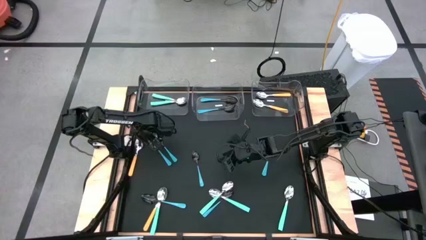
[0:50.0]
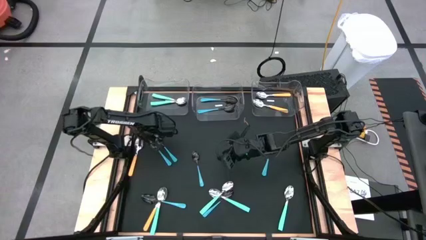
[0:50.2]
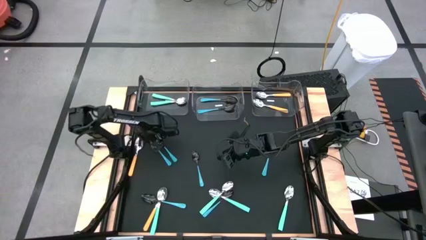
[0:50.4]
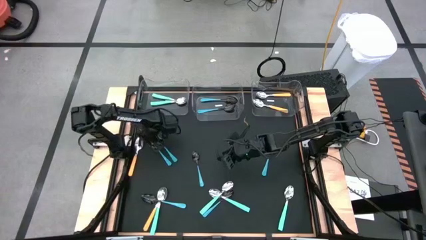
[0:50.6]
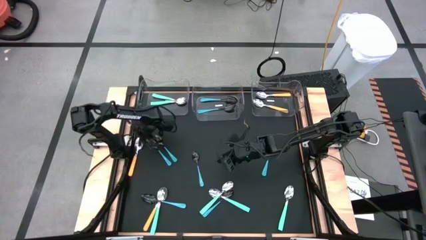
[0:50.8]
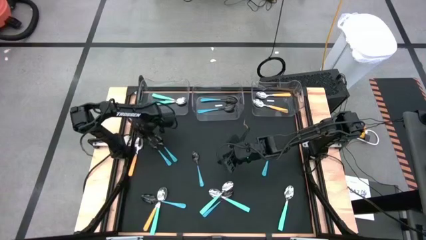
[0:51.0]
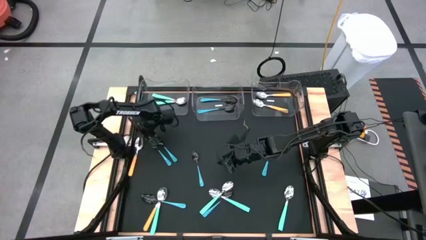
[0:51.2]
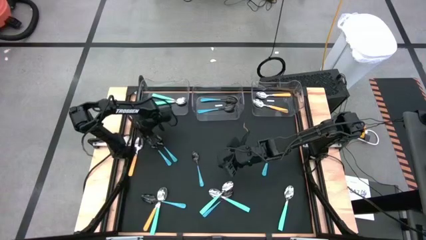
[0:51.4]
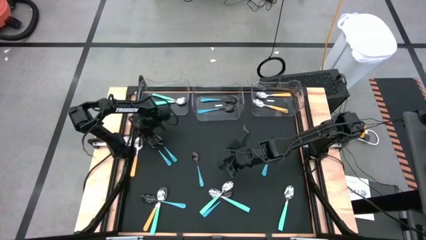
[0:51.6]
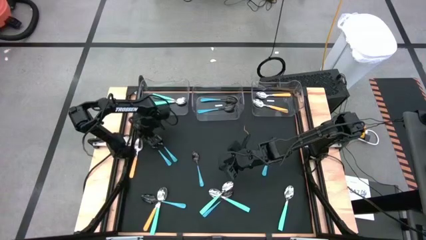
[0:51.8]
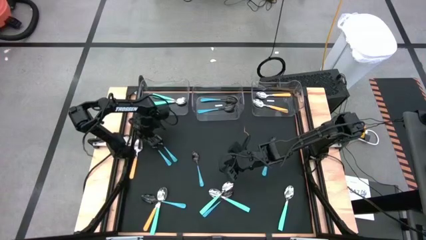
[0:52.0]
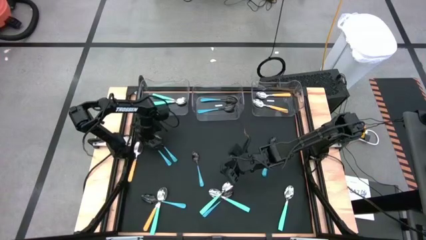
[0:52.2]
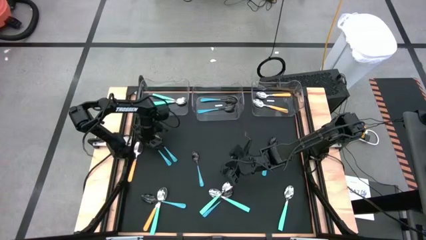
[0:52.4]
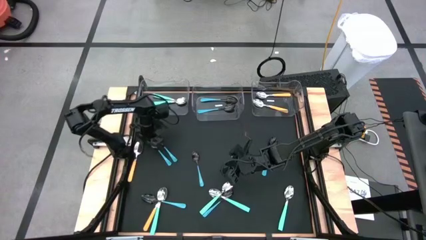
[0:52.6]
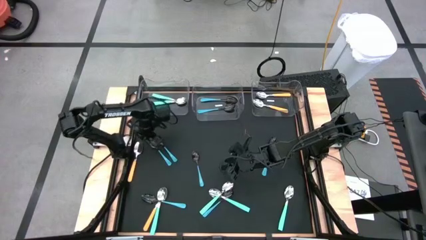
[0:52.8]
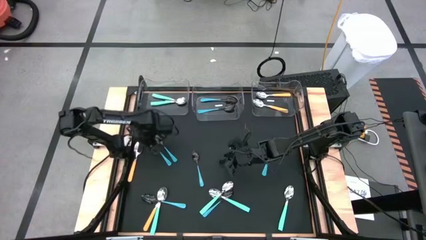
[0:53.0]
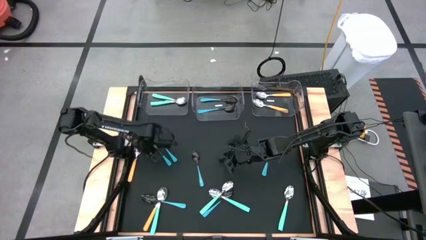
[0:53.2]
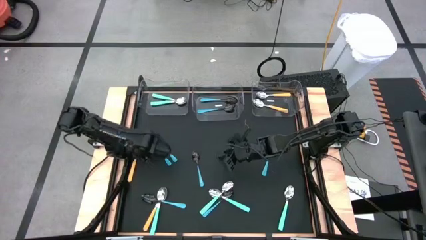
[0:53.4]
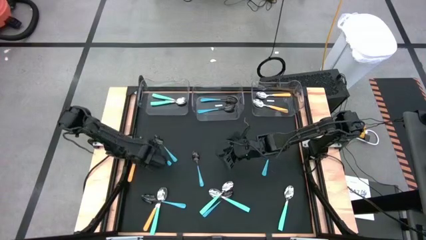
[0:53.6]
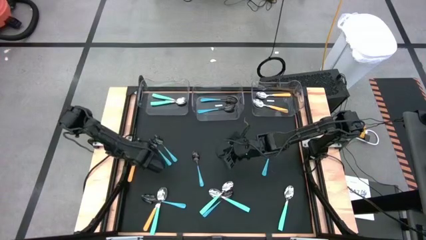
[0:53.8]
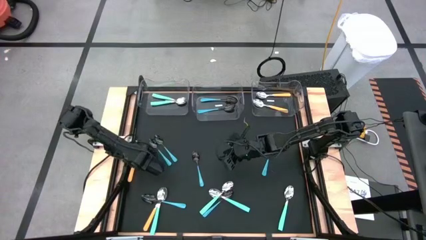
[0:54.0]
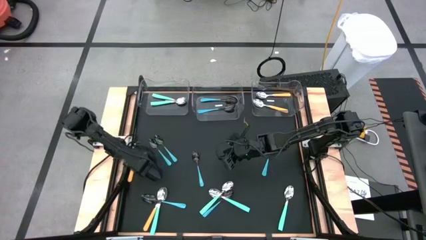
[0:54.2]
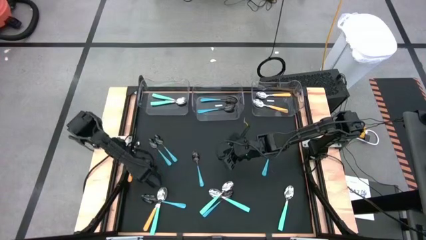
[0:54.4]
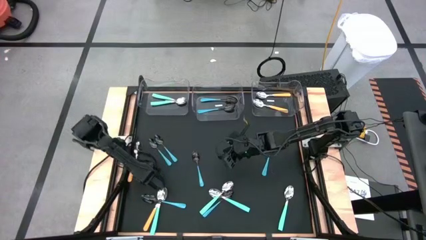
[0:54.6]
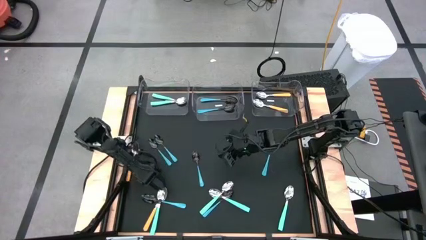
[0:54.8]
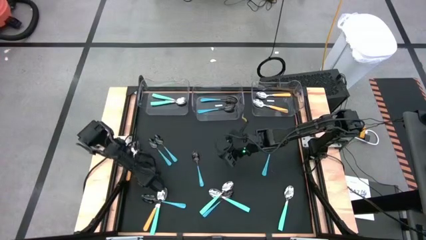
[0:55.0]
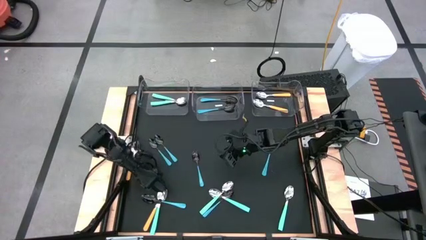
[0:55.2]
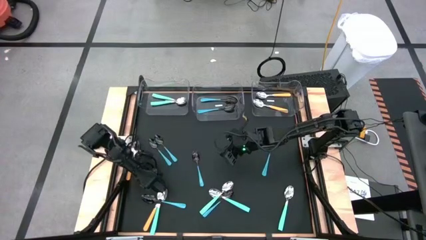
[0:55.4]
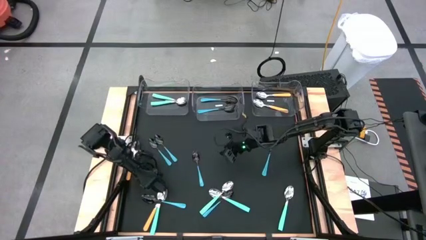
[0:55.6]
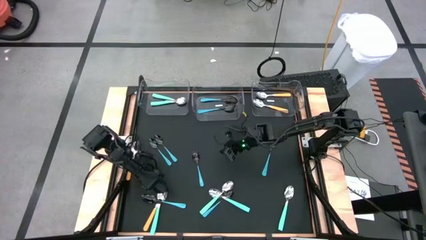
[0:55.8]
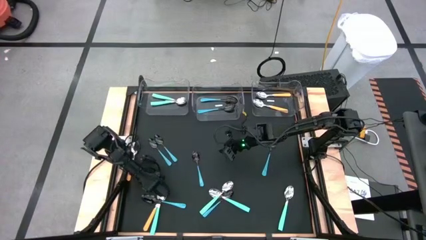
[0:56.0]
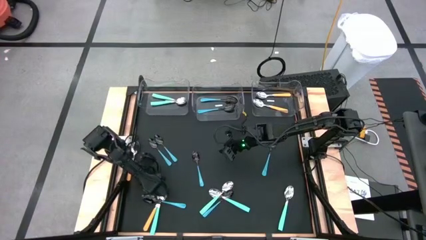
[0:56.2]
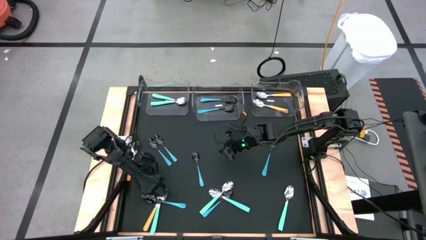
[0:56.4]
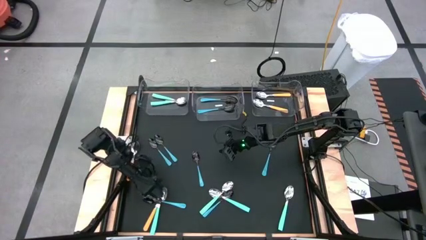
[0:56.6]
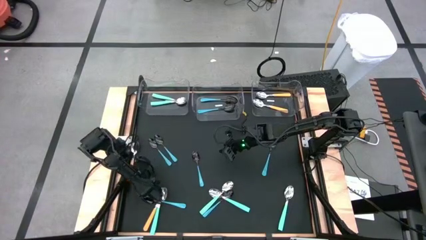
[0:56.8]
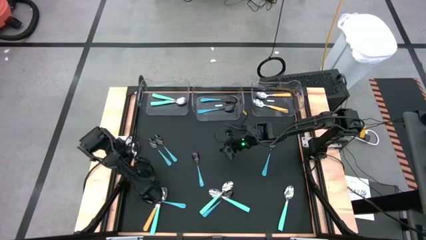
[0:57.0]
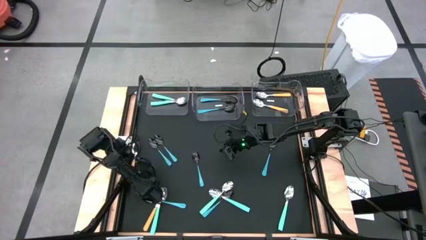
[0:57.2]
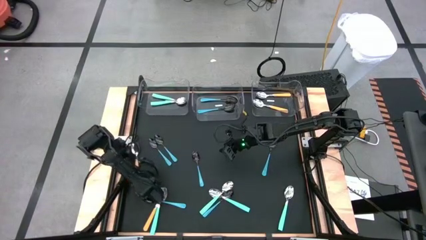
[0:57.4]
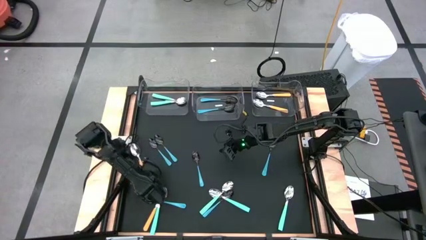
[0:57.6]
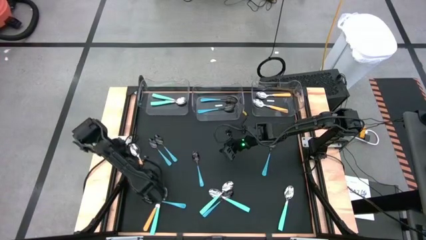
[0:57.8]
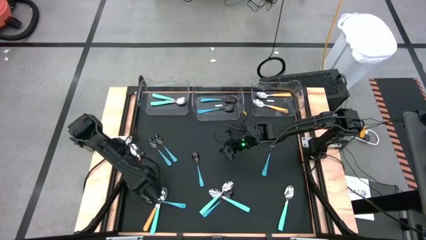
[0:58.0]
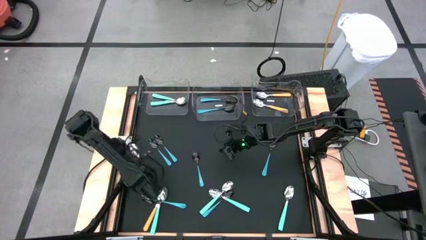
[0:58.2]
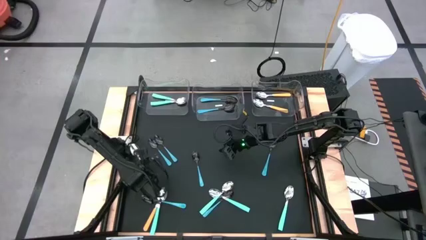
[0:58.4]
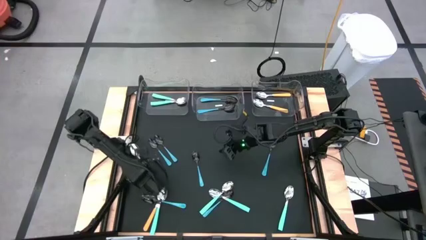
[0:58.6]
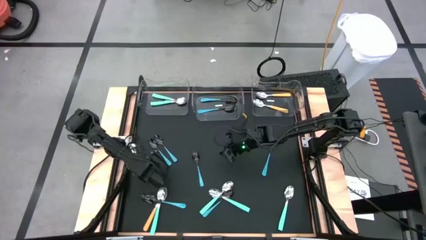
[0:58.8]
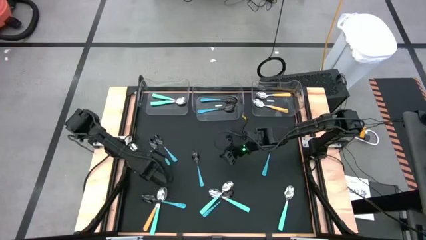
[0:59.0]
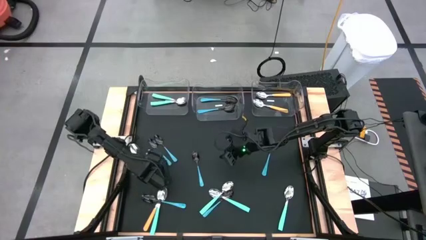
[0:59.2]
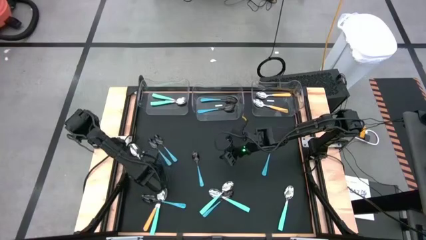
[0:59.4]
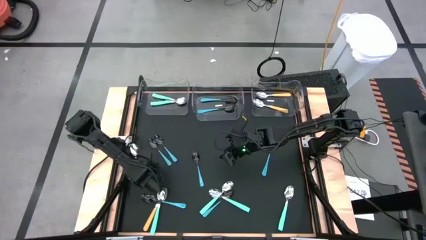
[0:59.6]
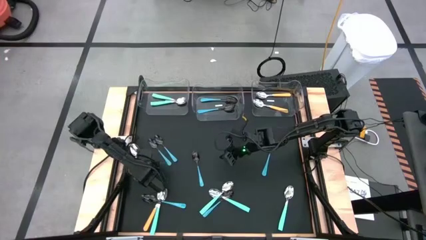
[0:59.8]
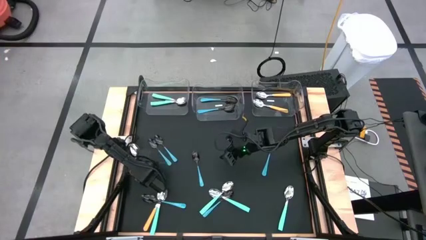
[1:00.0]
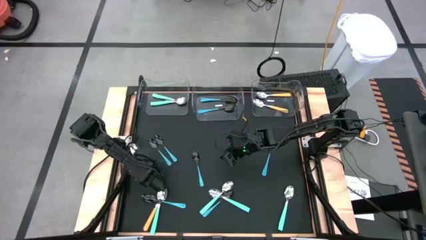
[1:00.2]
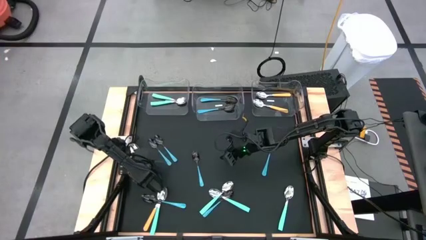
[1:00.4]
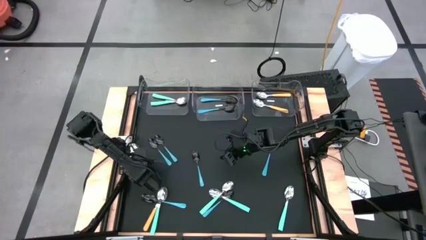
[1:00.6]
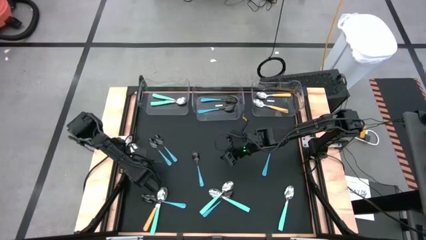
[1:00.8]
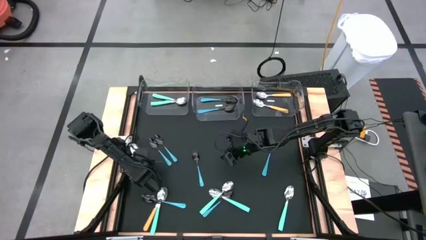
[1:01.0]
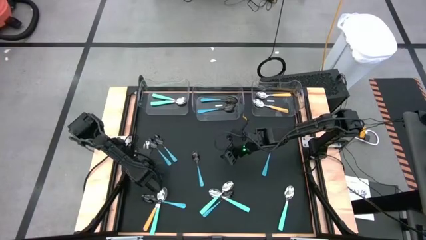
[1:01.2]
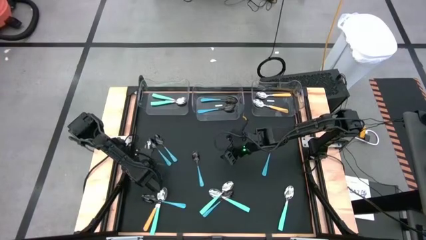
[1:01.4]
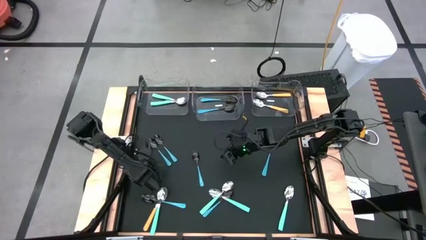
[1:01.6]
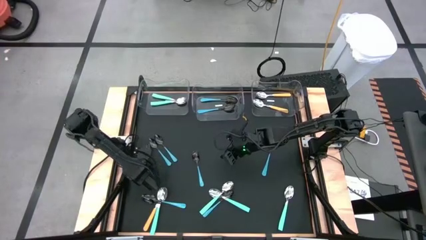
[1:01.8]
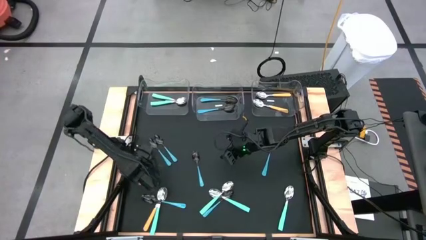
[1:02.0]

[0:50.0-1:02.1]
Task: Sort silverware by color (type)
Put the orange spoon into the right transparent bin
